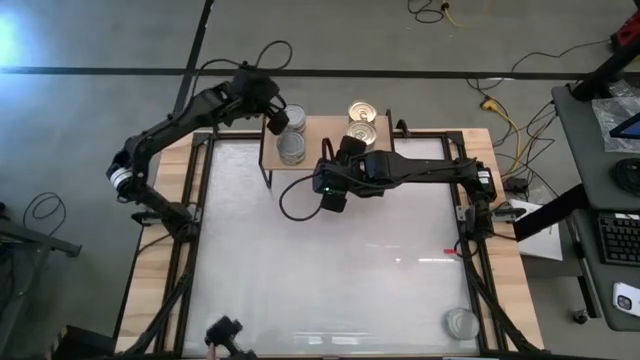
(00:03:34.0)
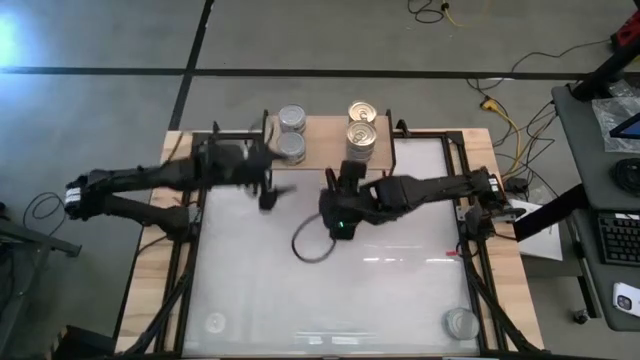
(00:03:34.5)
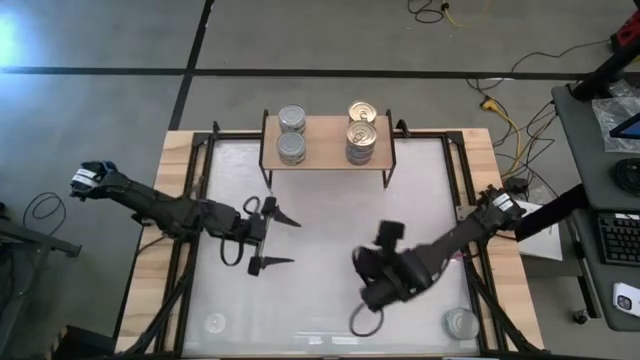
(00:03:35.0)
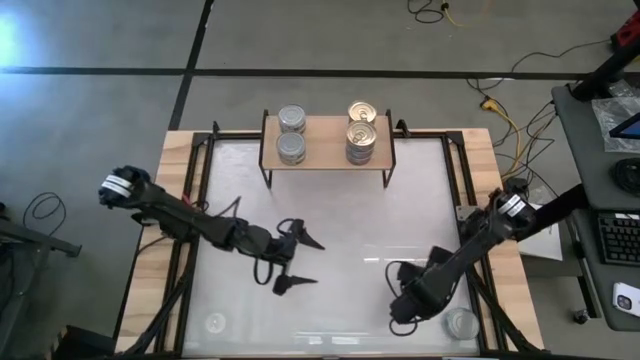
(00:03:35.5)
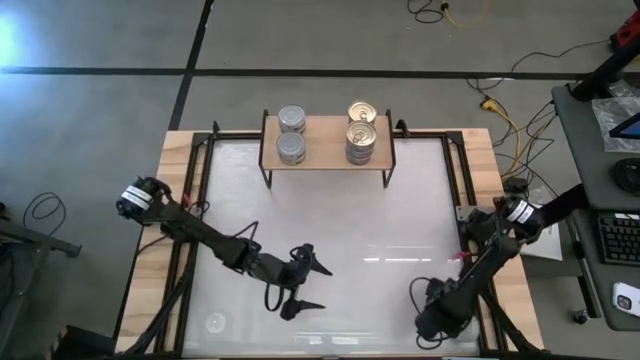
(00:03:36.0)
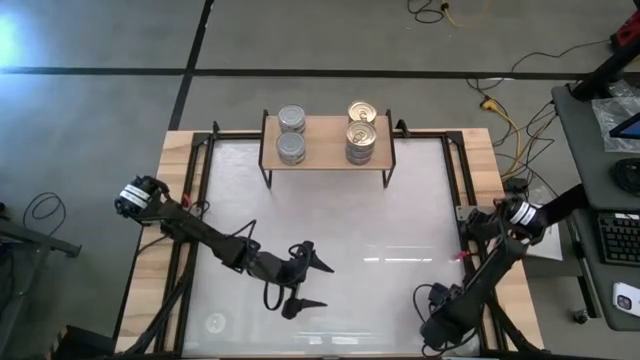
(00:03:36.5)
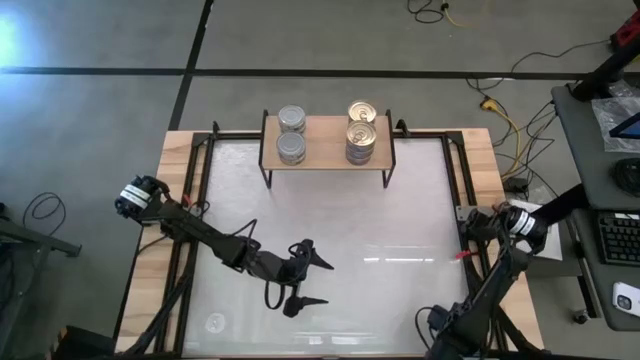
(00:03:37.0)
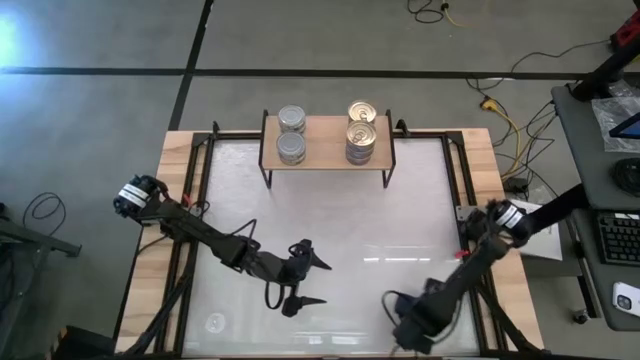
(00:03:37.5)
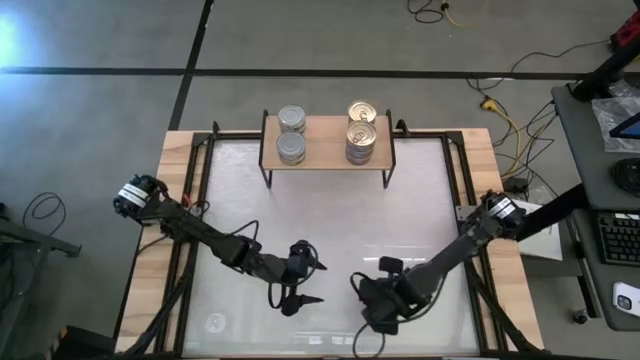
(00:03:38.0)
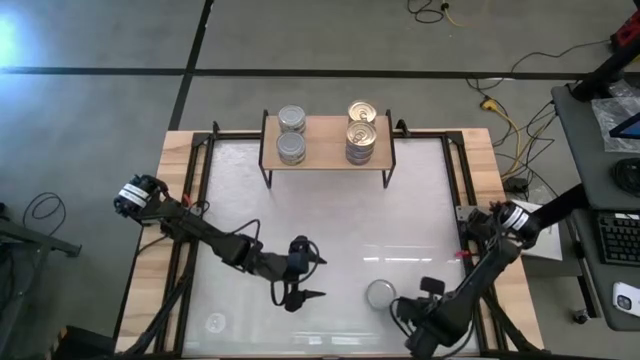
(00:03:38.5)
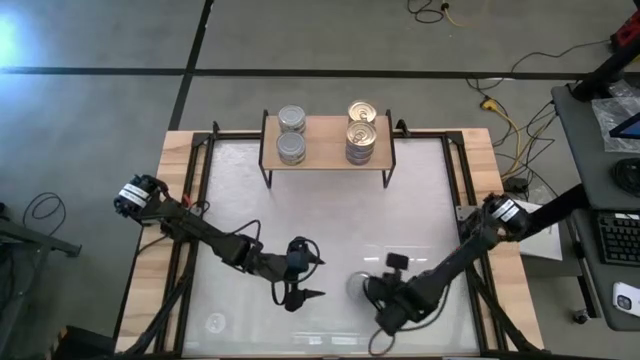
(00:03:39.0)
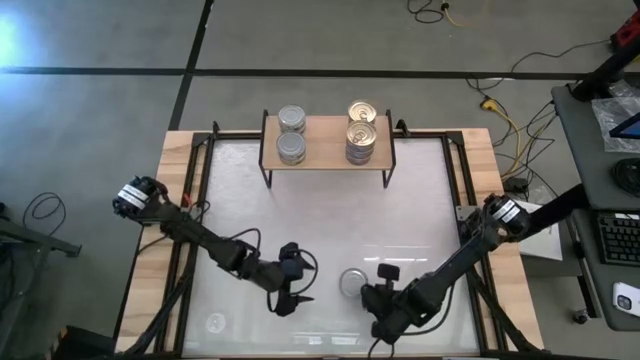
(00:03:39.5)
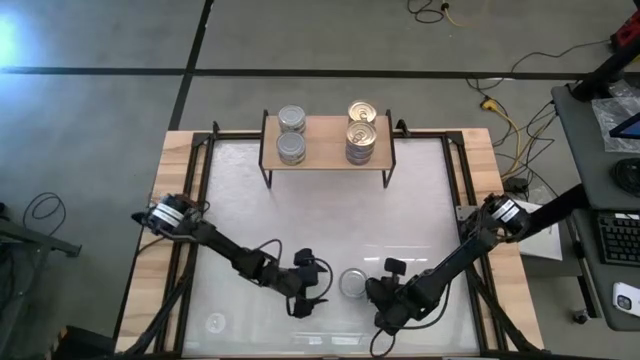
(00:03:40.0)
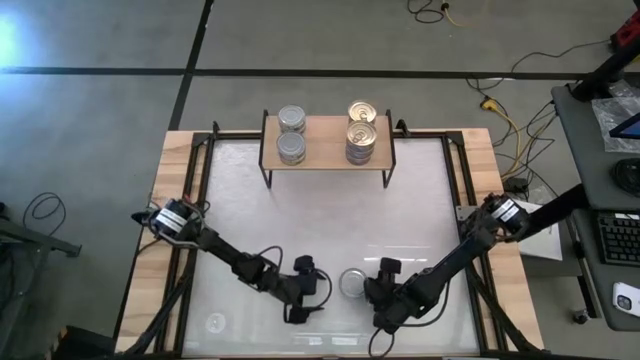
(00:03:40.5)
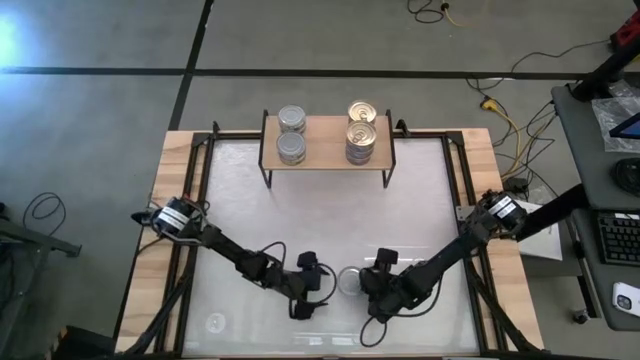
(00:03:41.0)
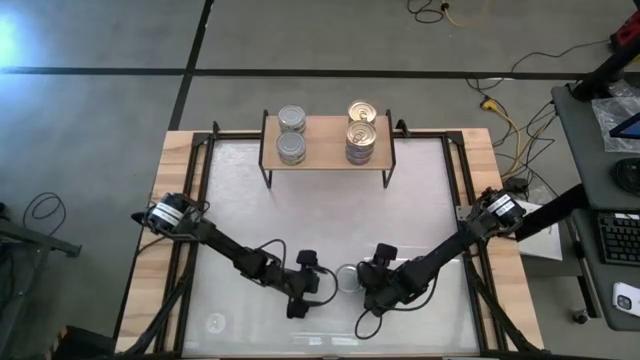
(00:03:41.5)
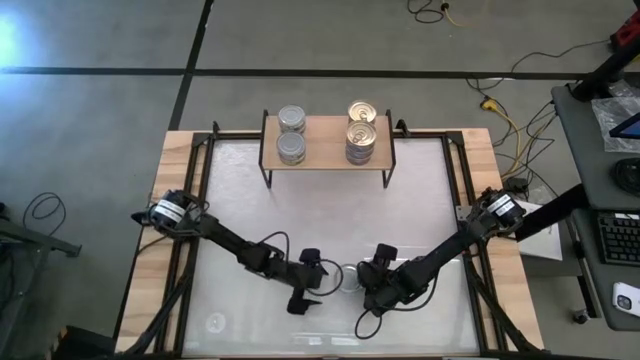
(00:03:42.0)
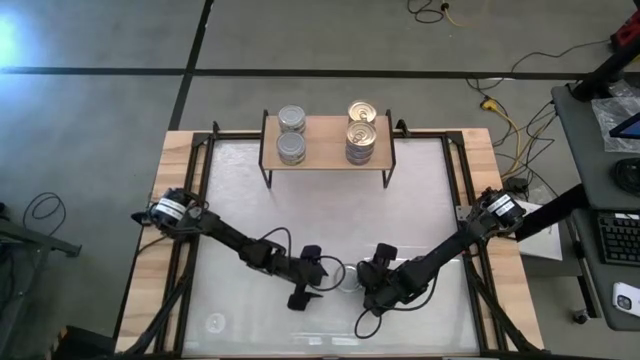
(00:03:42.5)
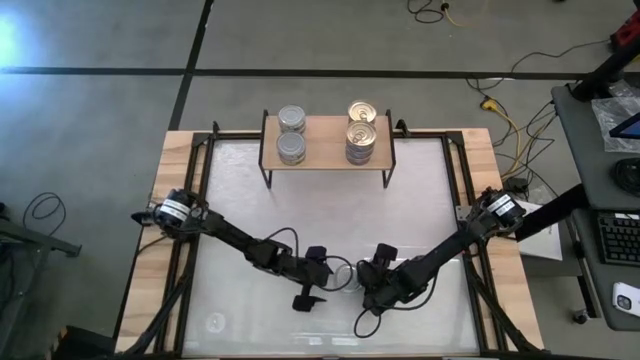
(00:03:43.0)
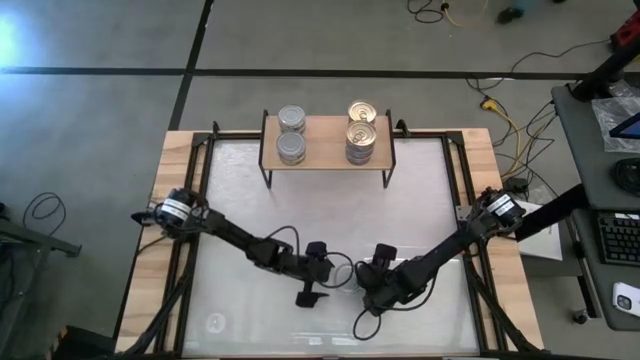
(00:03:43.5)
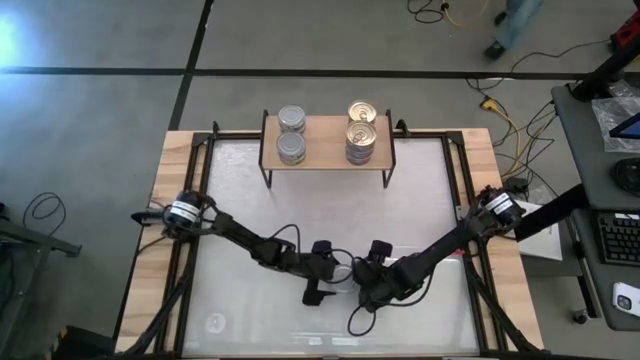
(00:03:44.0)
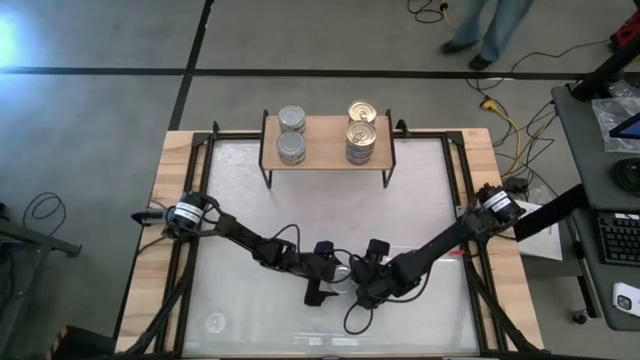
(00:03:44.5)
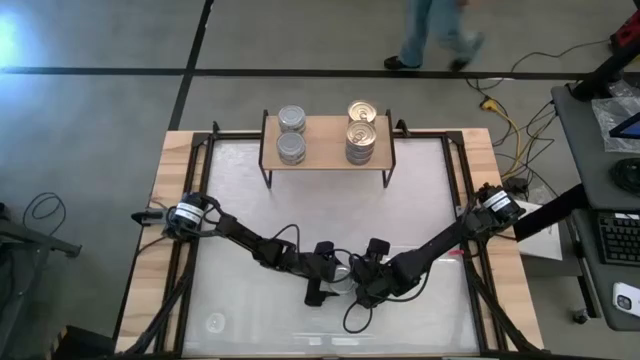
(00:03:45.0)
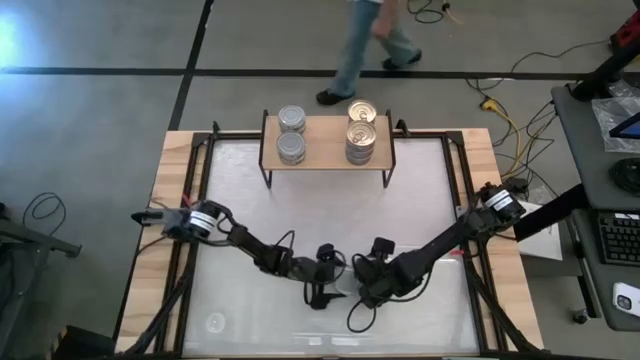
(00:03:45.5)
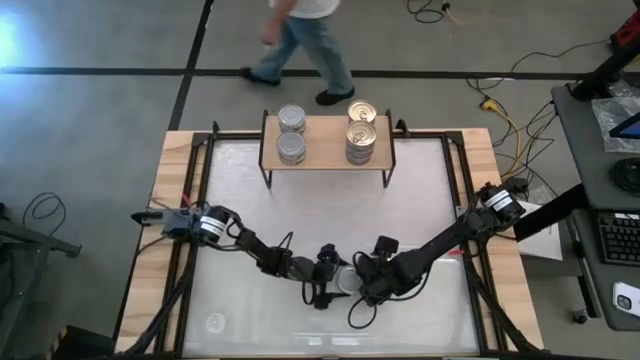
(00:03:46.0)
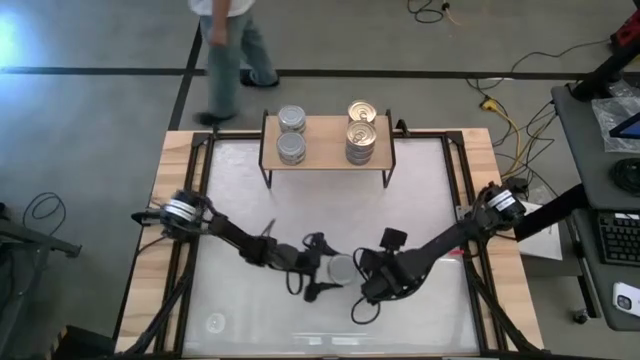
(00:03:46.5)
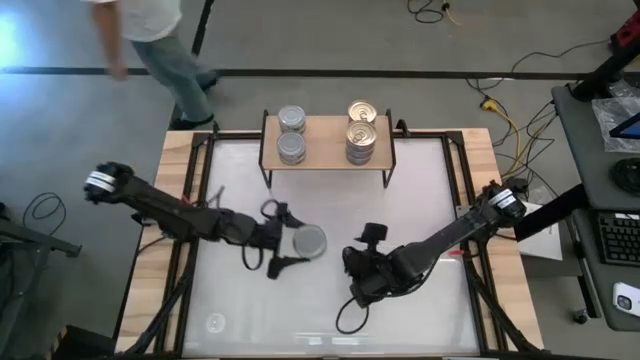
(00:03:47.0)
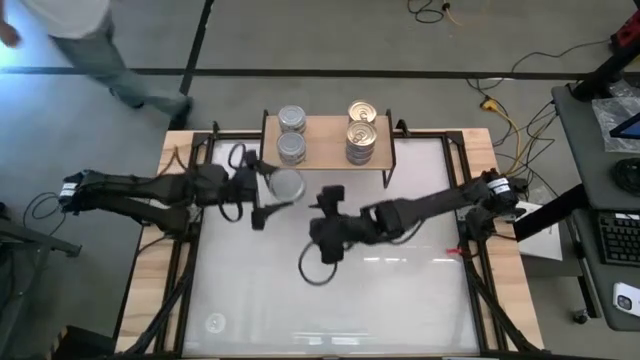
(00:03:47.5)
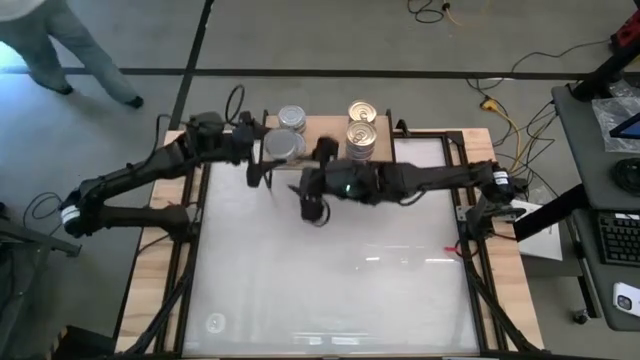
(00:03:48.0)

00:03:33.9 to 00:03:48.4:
Task: Stack canned seafood by type on shelf
Stack the green tuna can on top of the green tuna can on the shelf

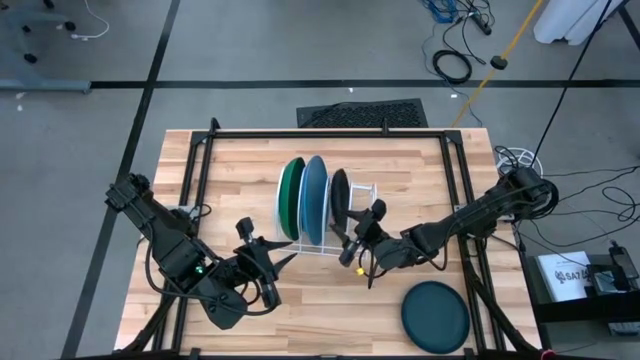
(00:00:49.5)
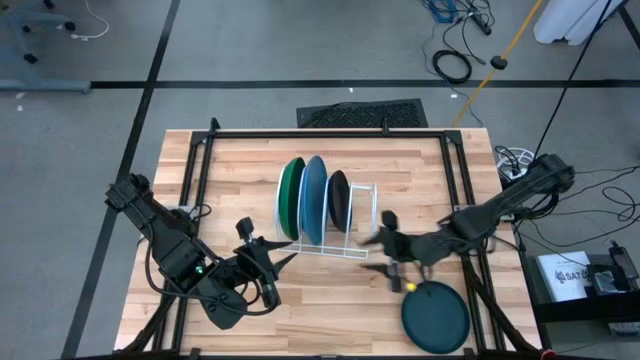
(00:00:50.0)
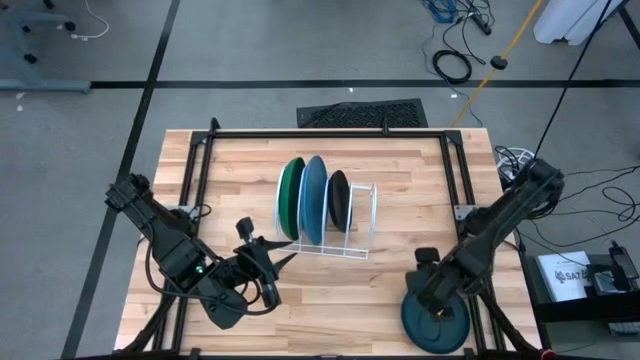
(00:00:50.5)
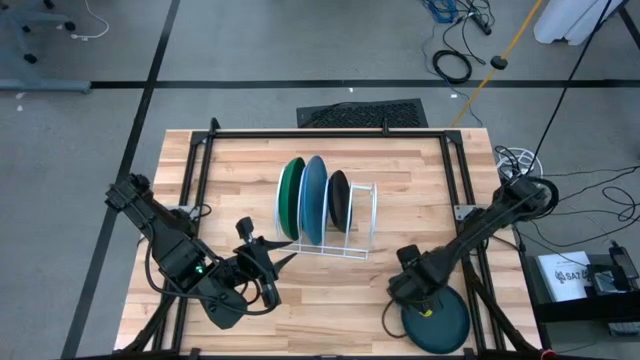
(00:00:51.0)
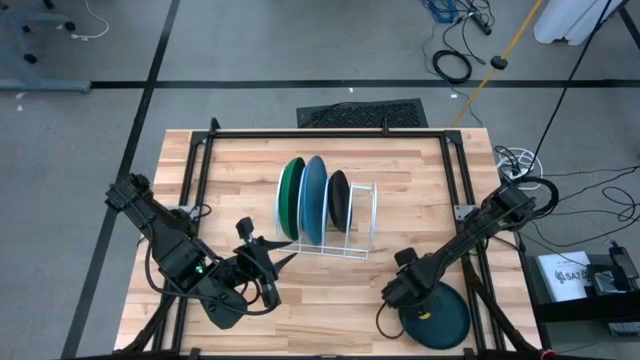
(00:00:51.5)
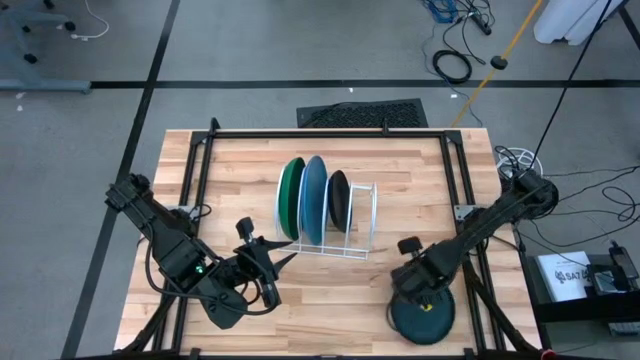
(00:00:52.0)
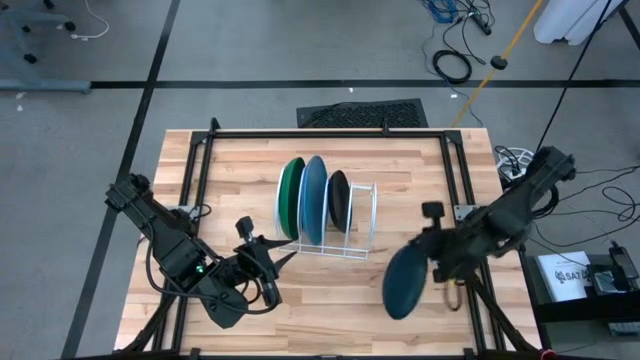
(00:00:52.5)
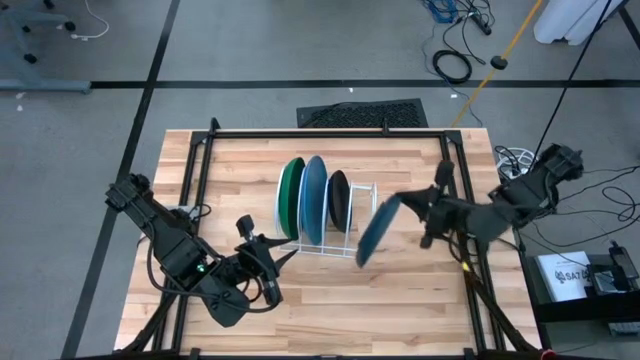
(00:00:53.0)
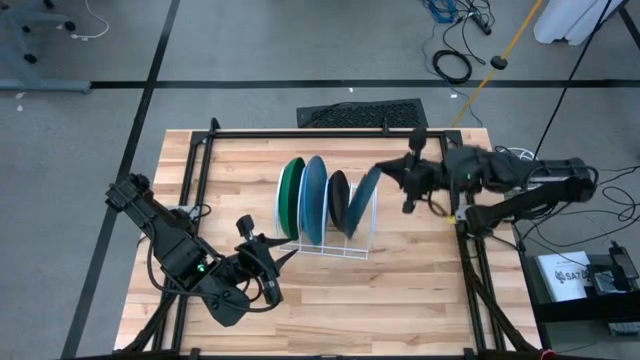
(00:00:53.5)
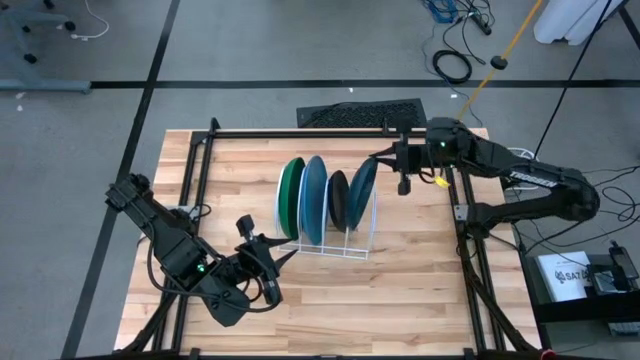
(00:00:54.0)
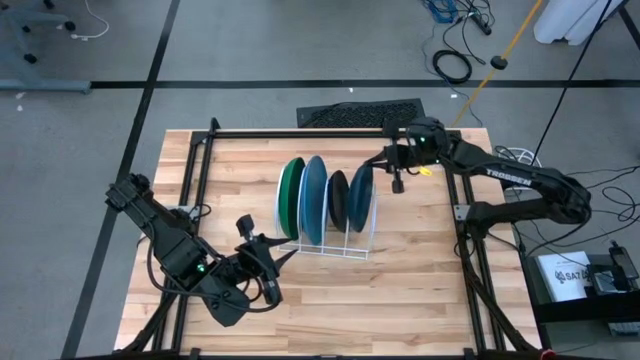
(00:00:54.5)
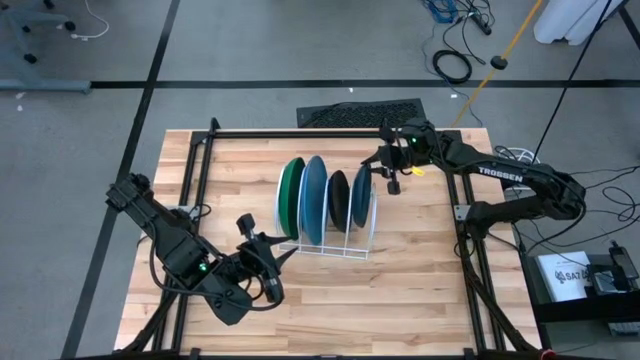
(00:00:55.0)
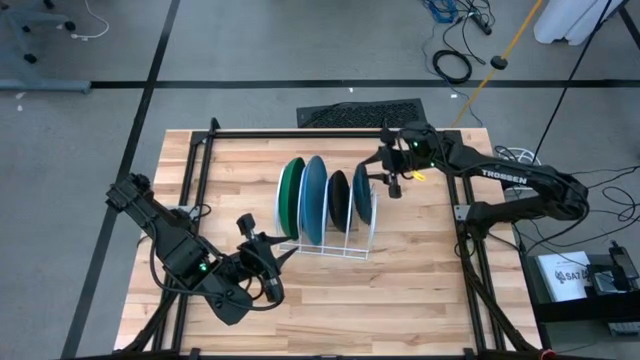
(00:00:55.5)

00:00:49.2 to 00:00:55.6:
Task: Sort dishes
Put the dark blue plate into the dish rack
